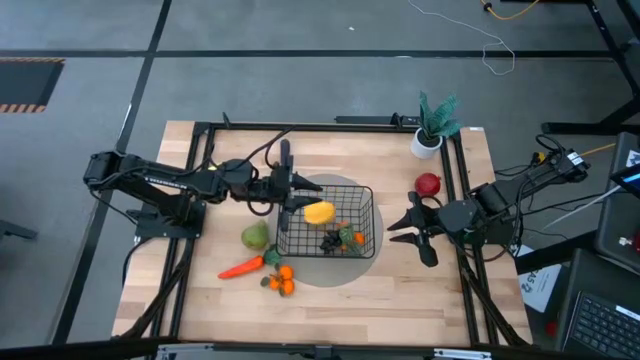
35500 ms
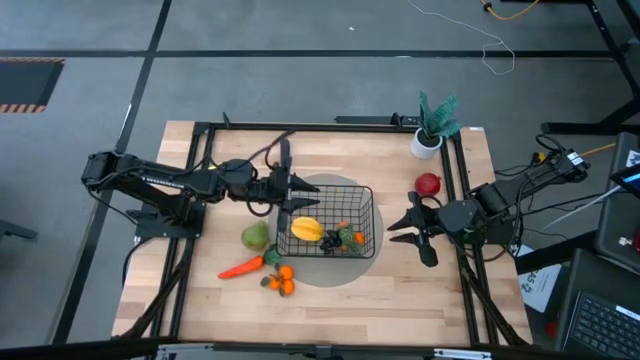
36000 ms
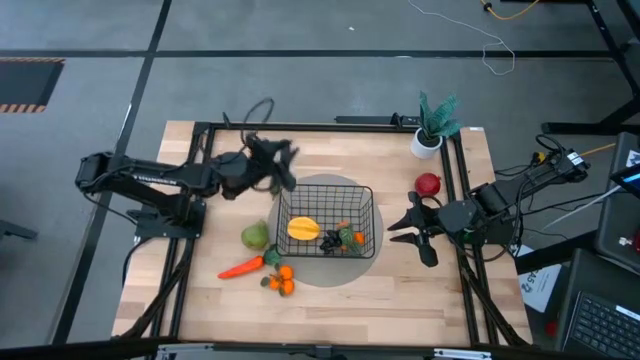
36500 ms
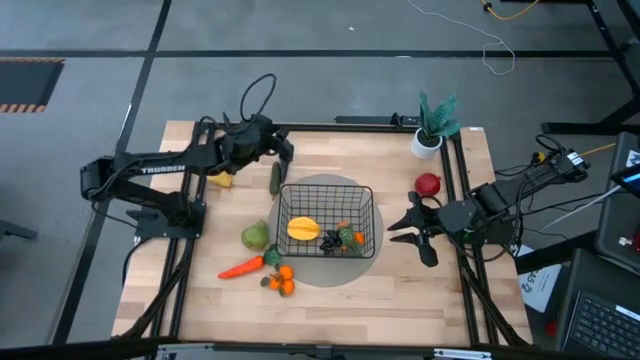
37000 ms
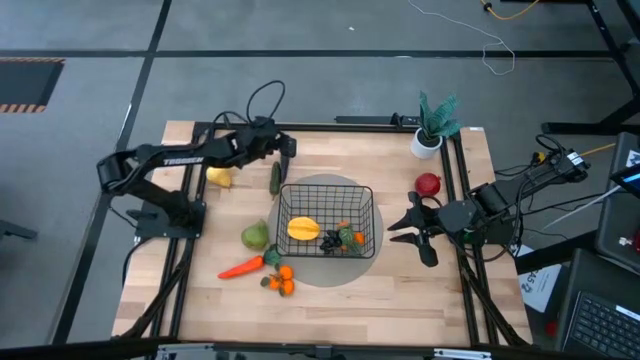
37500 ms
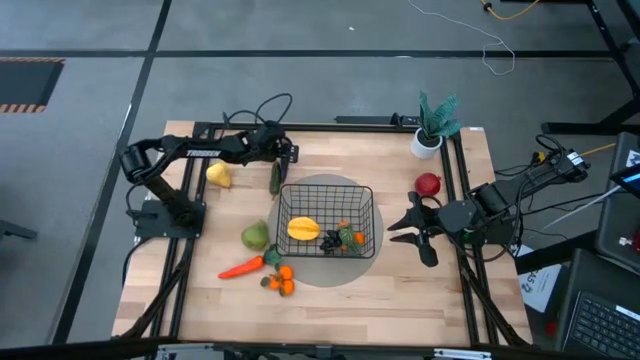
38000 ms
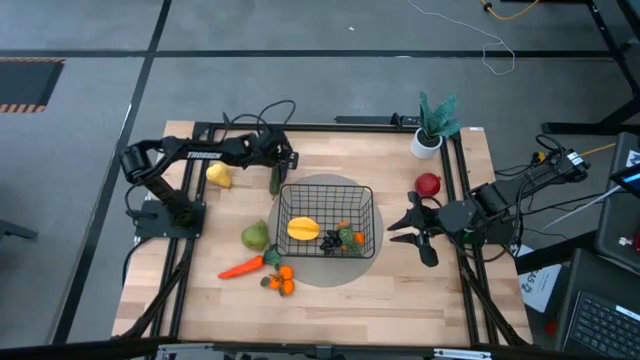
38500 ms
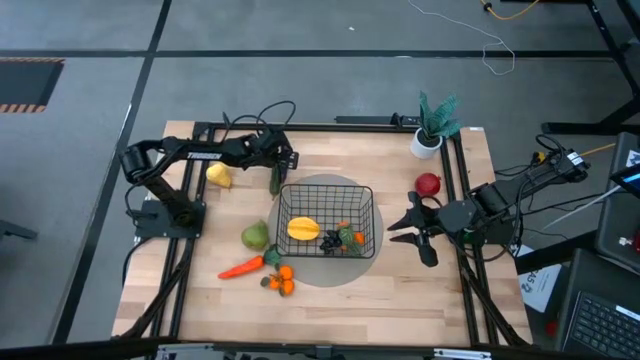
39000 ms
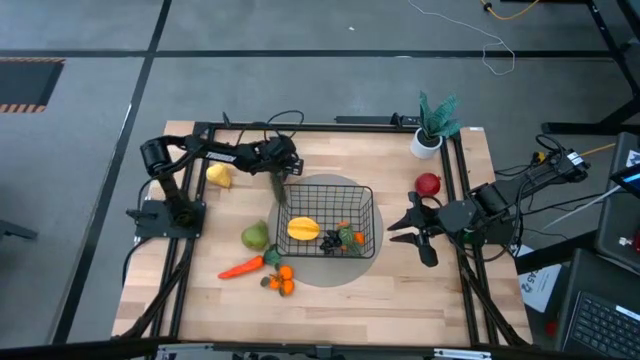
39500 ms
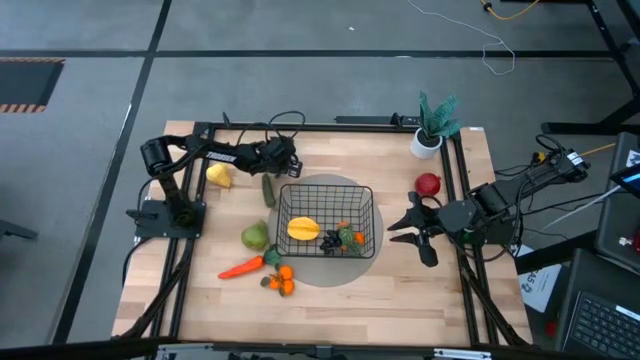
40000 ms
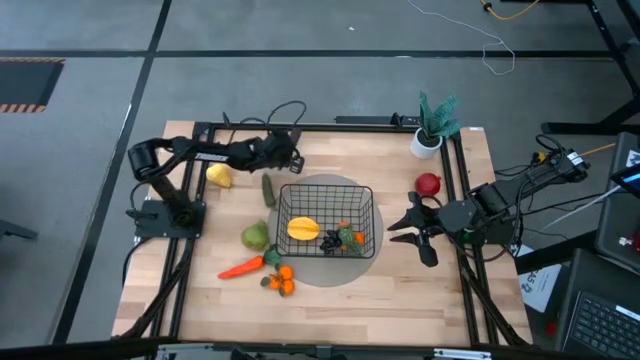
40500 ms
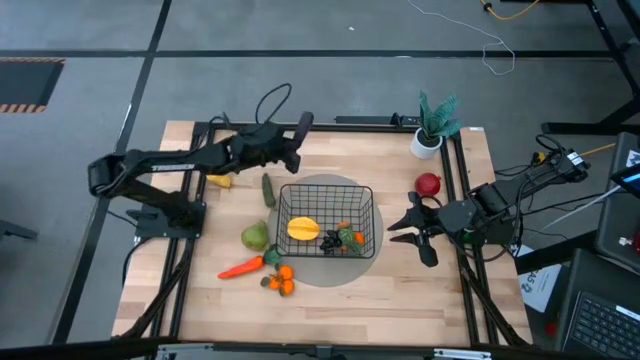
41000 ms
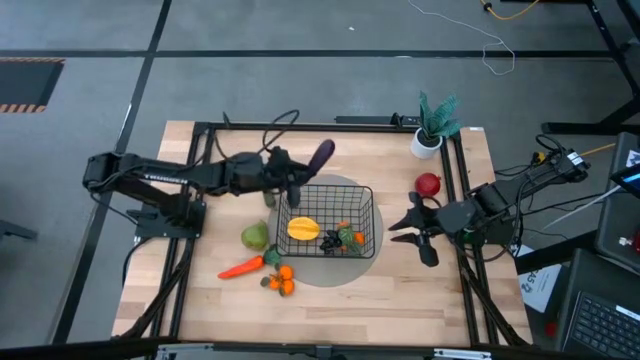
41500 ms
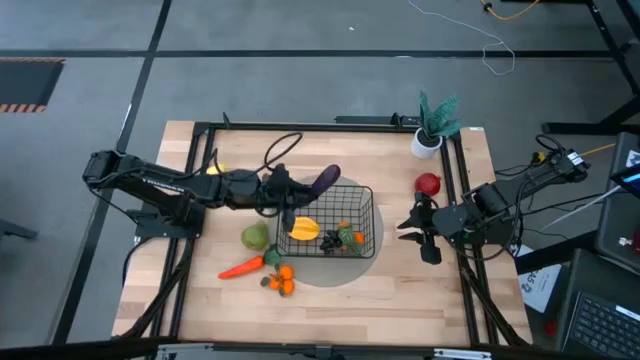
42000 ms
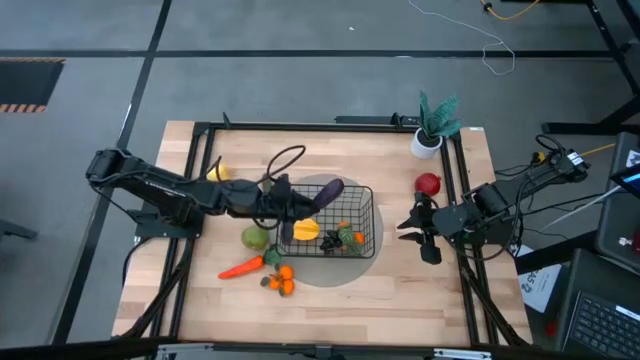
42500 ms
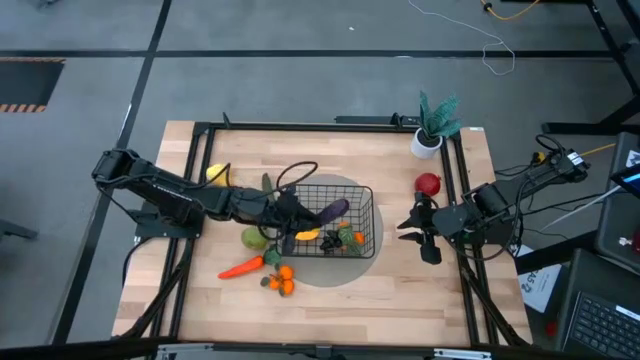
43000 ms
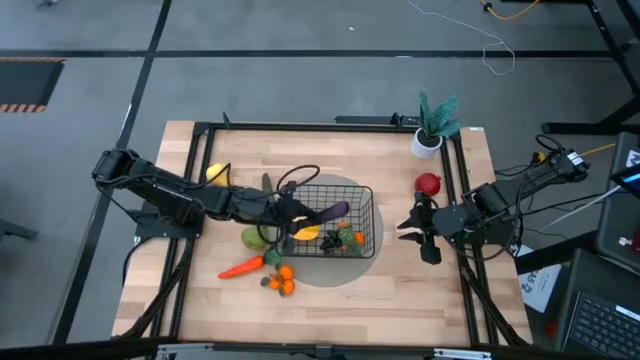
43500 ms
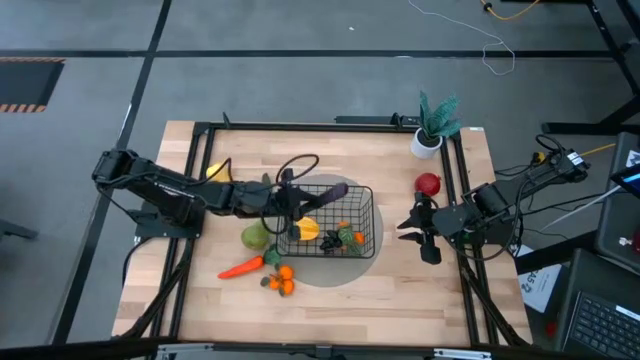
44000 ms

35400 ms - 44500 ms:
Task: Build produce basket
Put the purple eggplant into the black wire basket

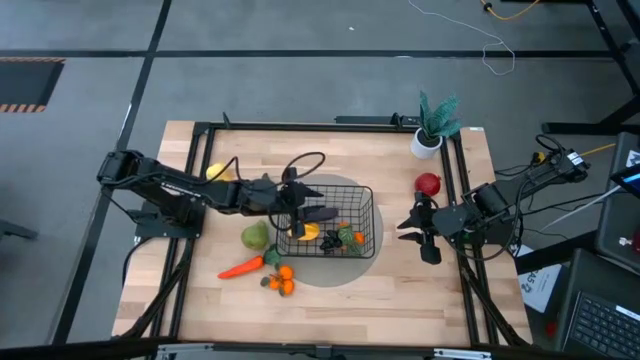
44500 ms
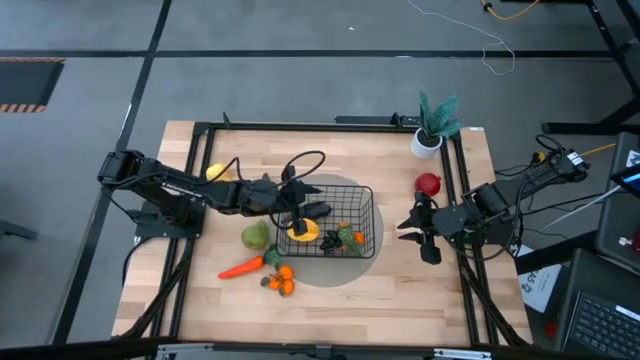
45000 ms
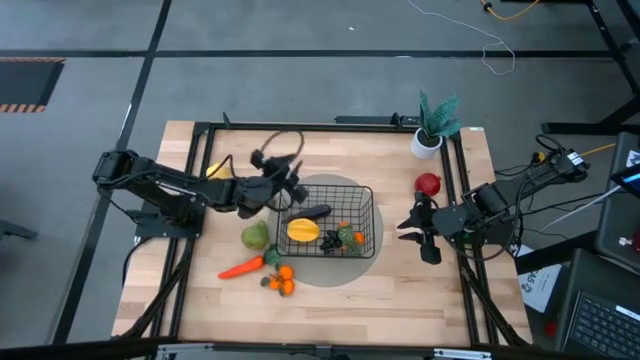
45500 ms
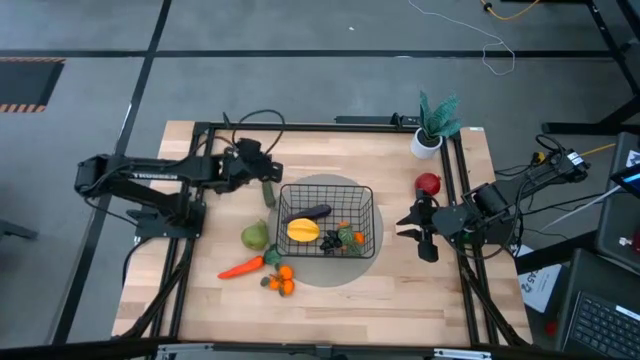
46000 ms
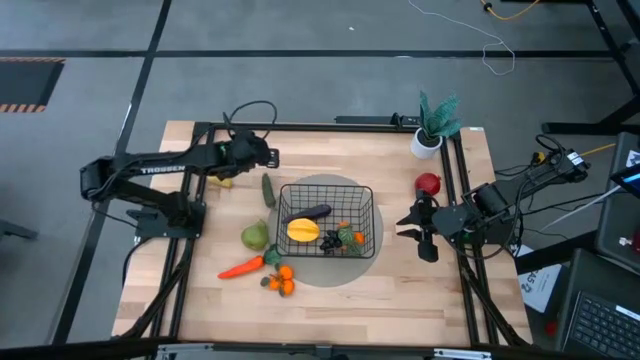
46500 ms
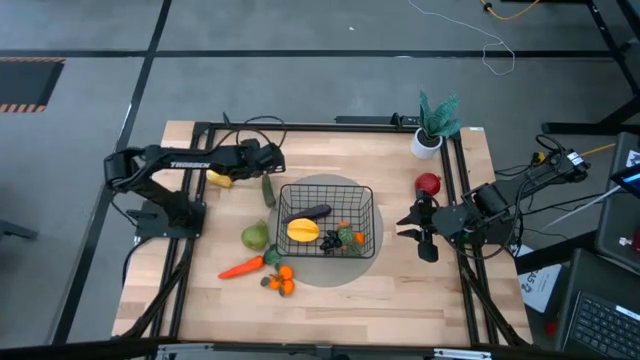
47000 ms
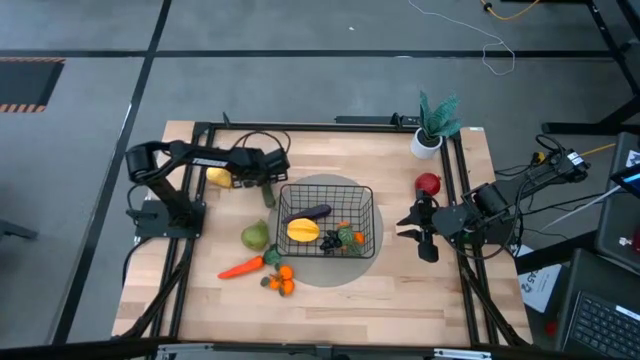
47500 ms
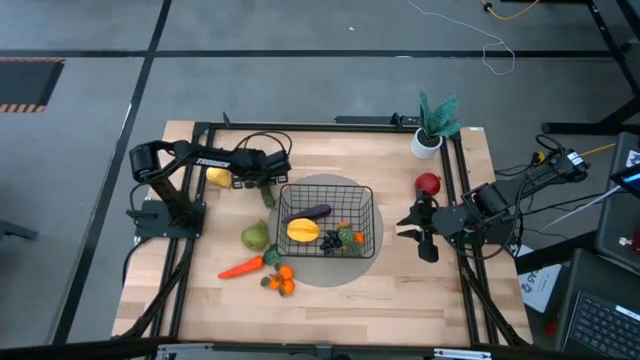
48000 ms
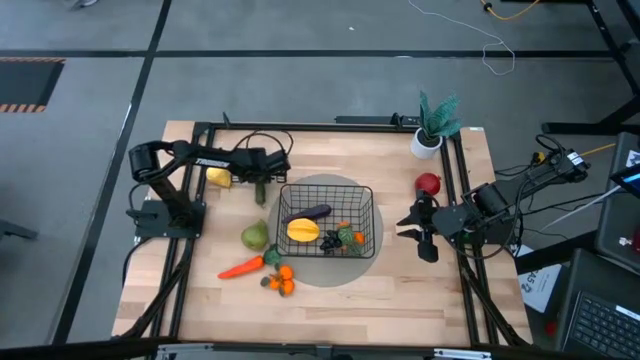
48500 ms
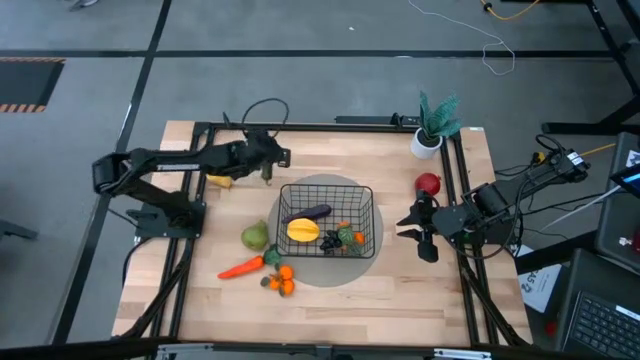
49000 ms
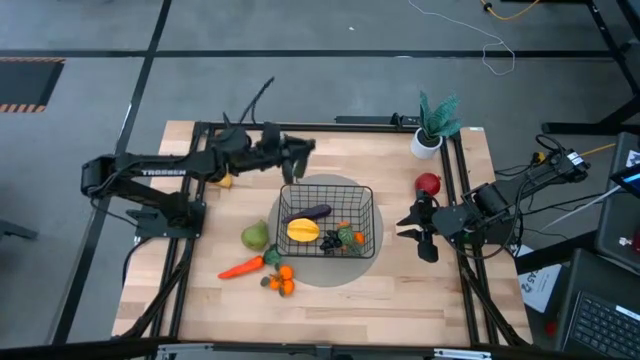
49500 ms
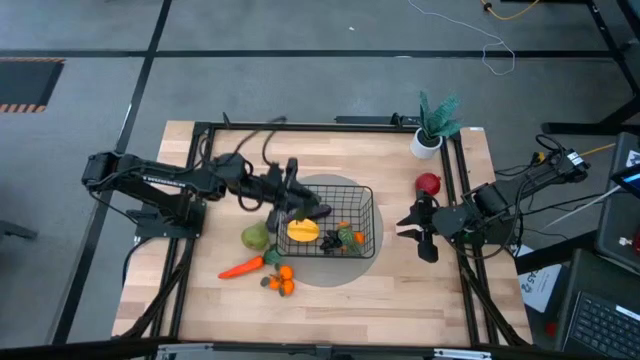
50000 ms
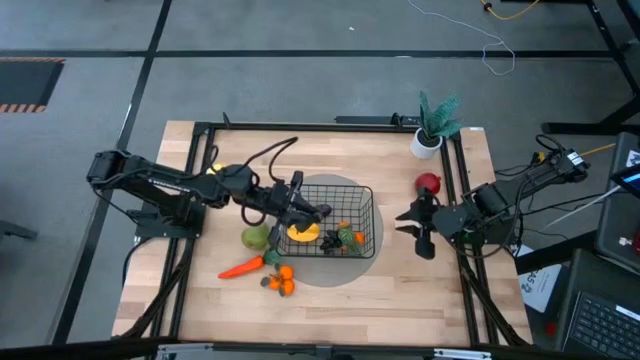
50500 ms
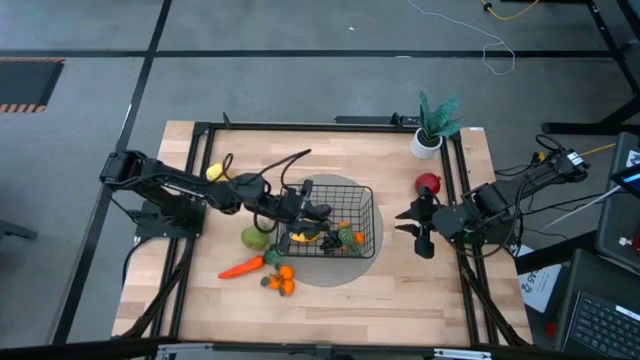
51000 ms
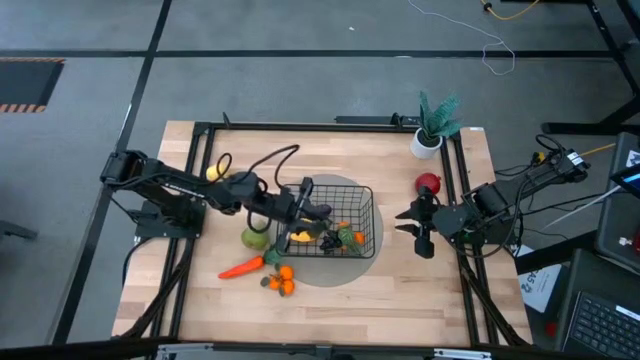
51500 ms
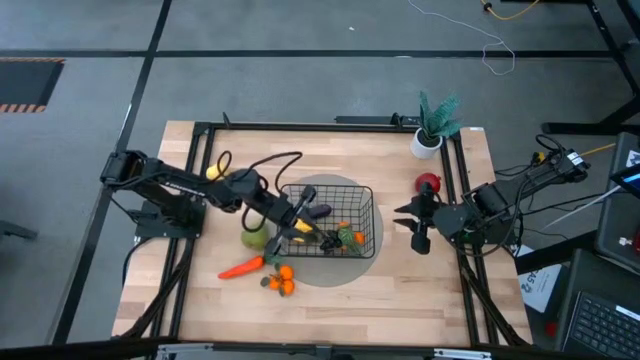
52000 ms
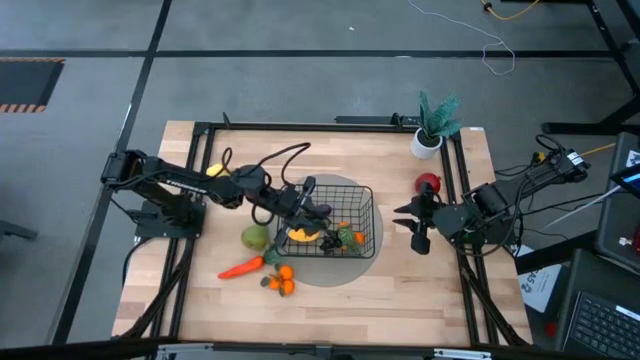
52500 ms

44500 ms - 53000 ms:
Put the green chili pepper into the black wire basket

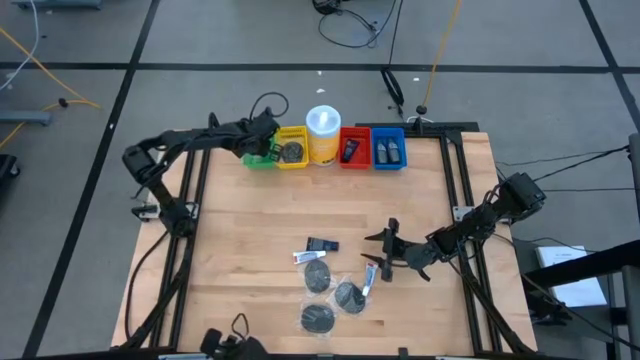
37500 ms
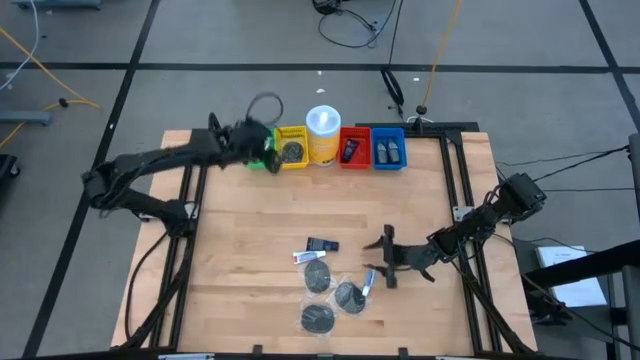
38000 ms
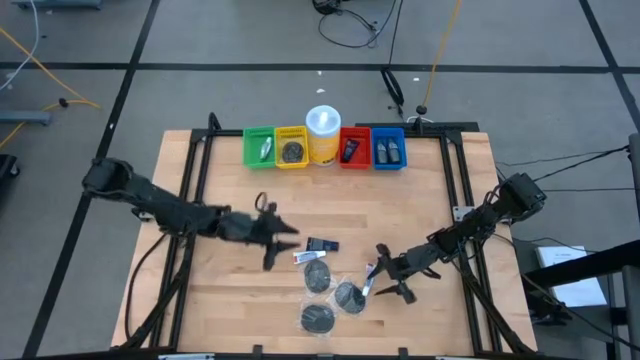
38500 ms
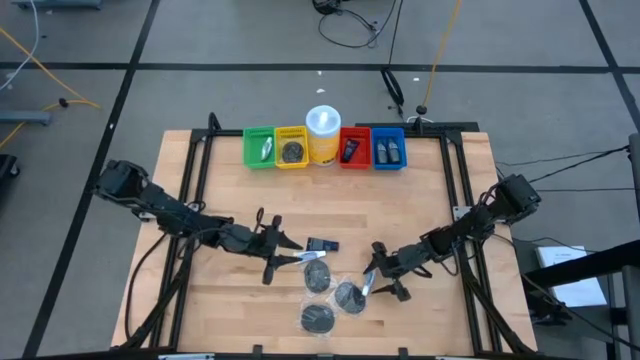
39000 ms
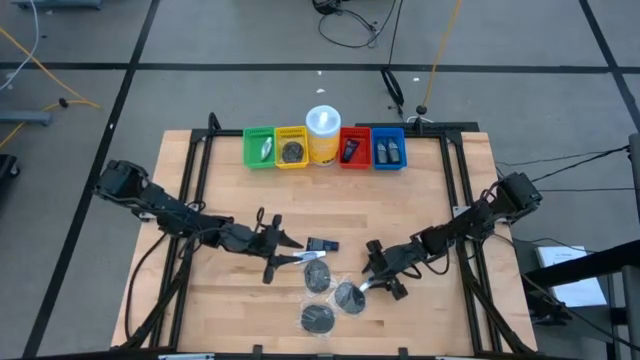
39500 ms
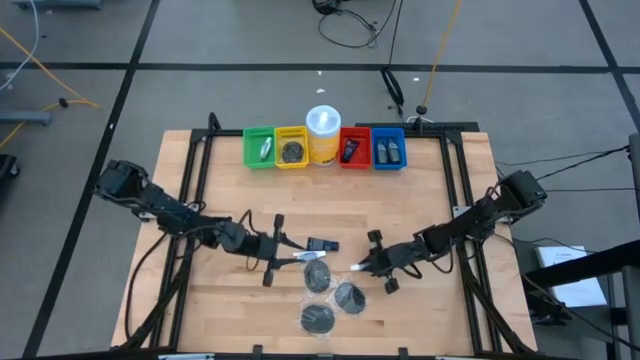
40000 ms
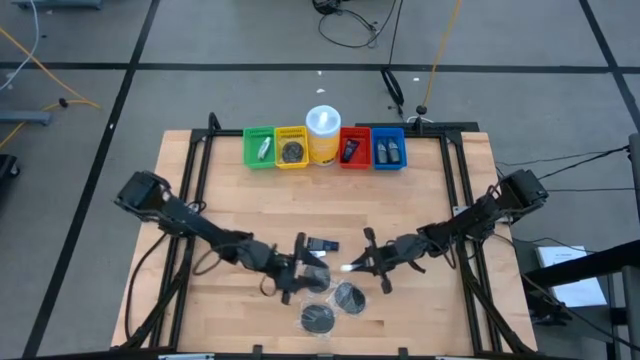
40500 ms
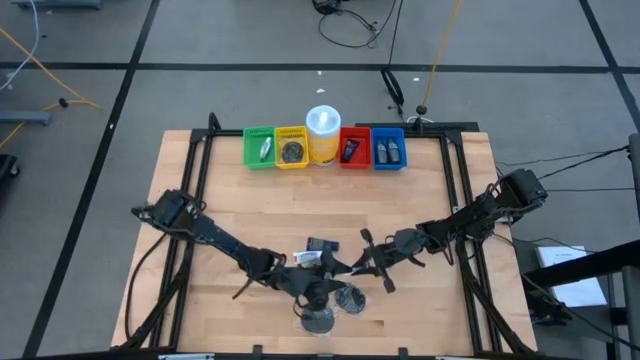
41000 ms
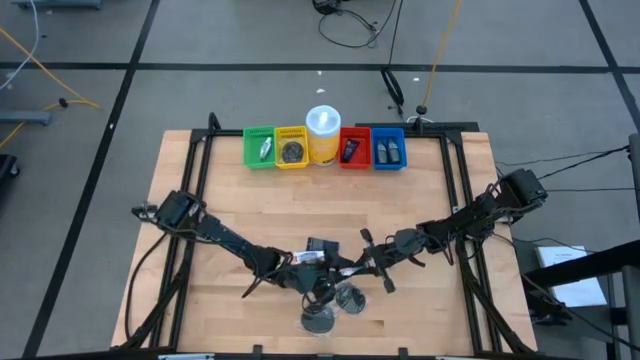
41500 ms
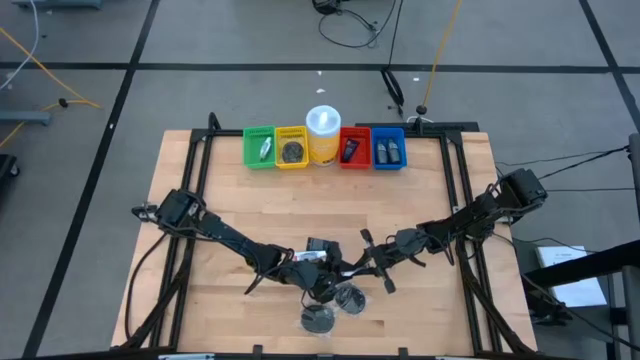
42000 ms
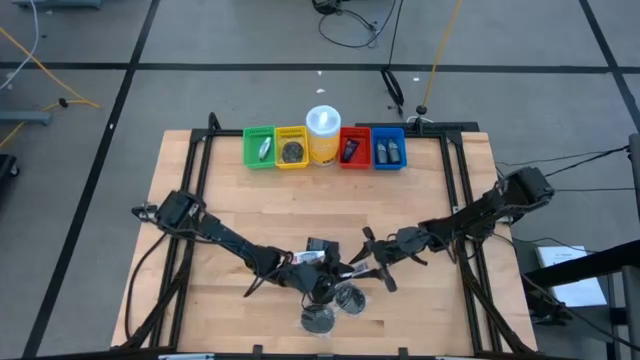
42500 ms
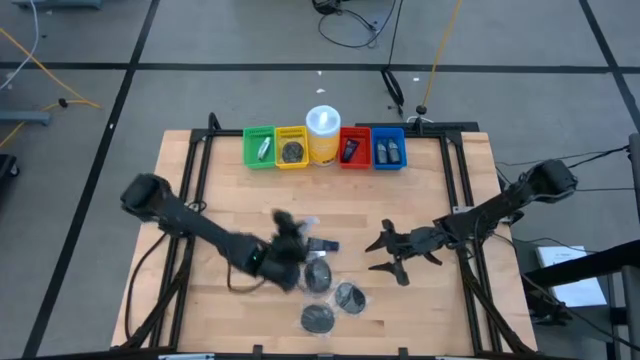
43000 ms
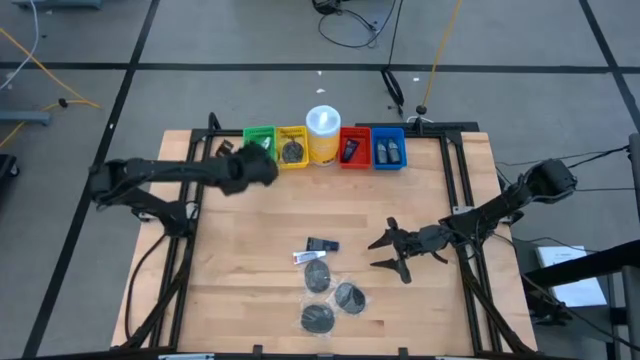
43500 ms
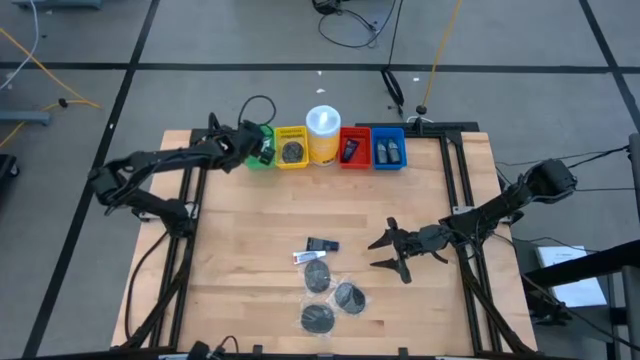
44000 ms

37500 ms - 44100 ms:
Task: Pick & Place Travel size toiletries
Put the white toothpaste into the green basket
